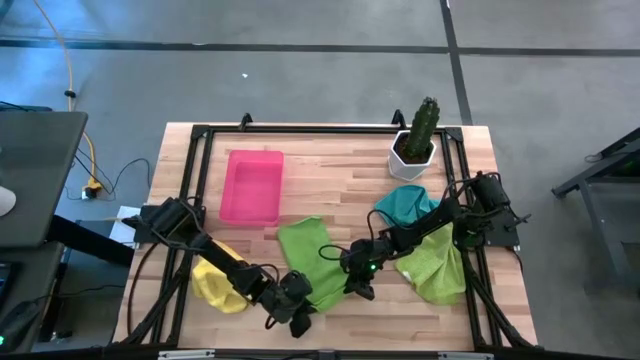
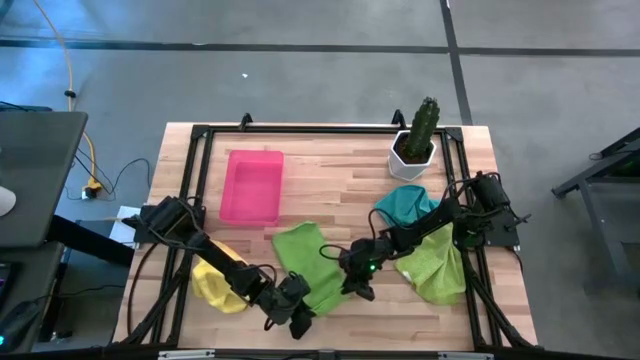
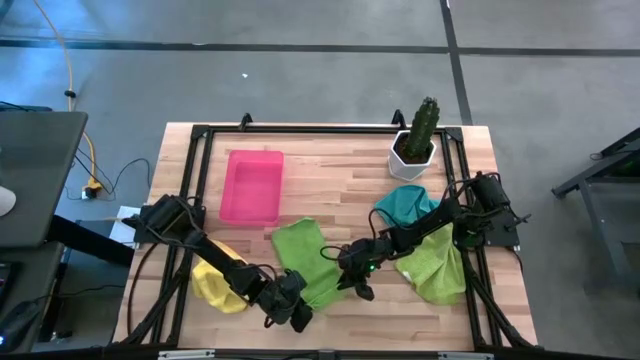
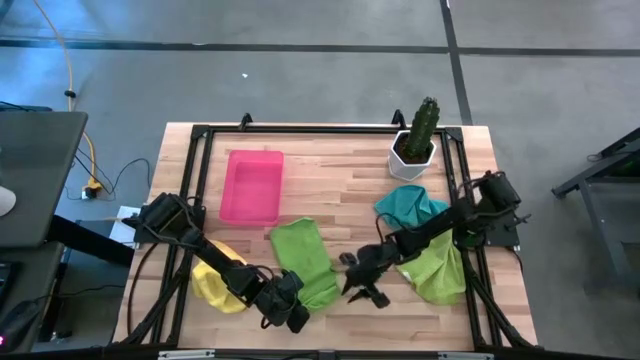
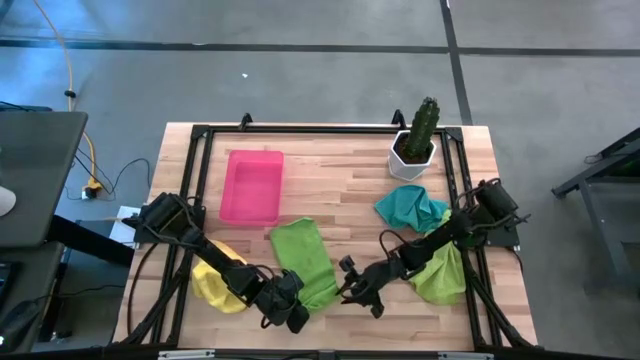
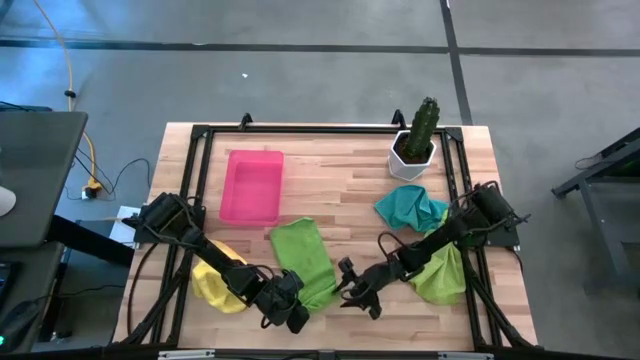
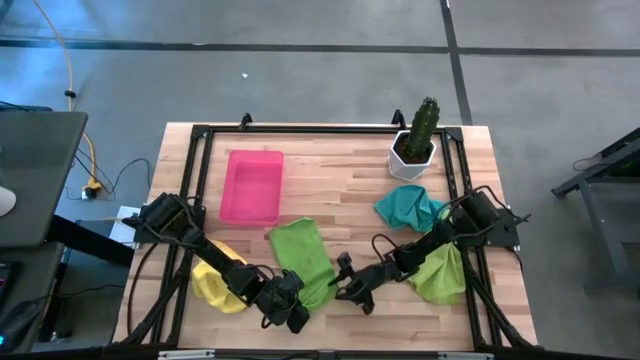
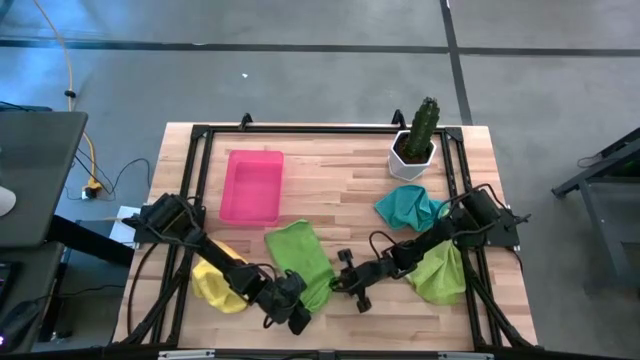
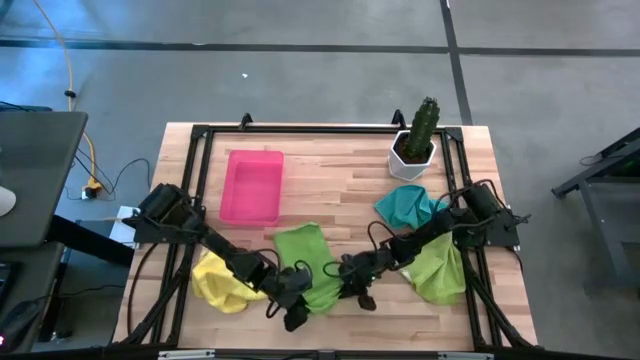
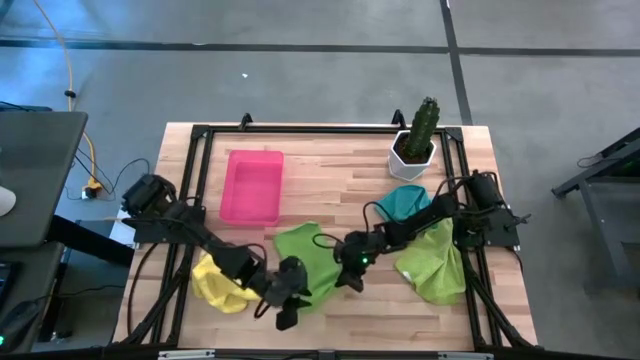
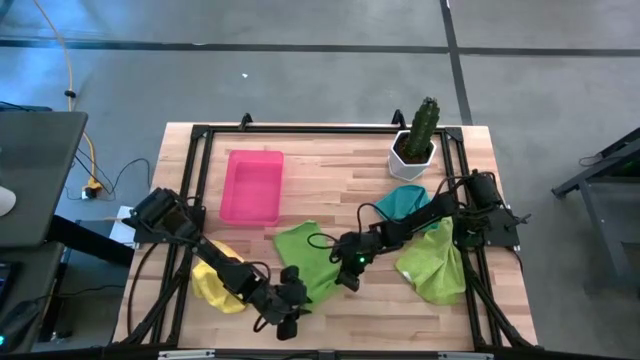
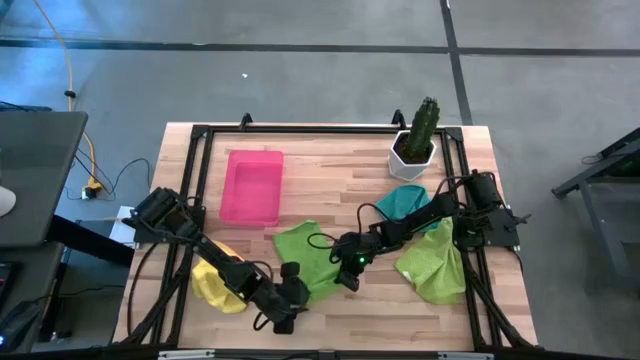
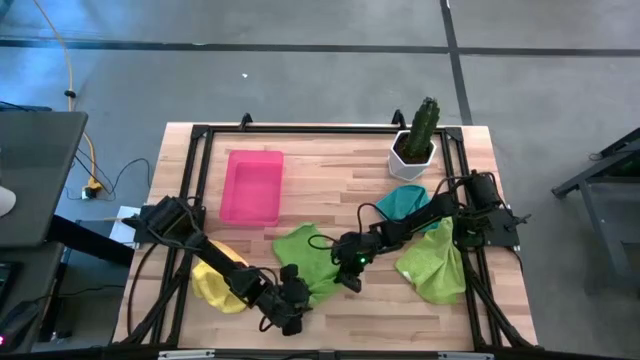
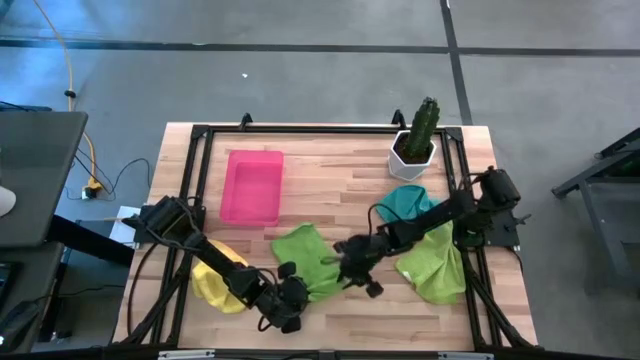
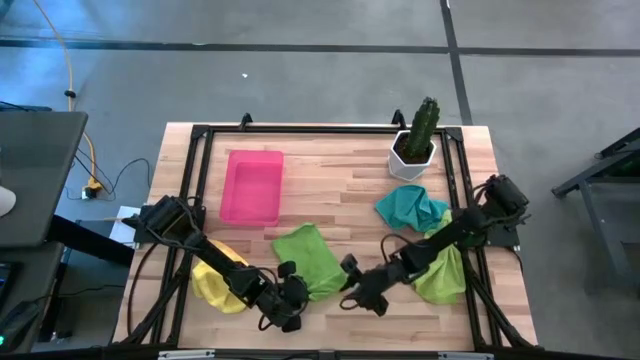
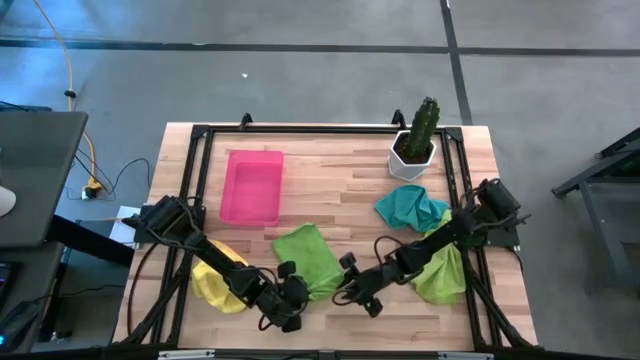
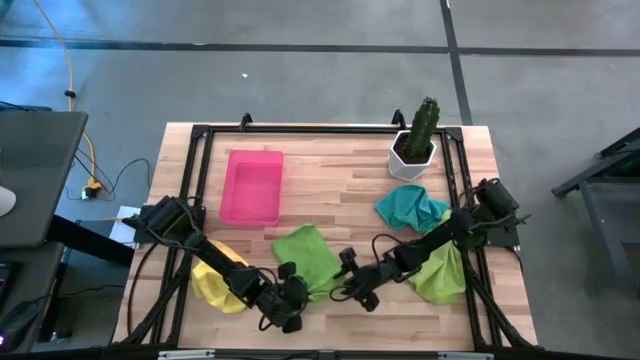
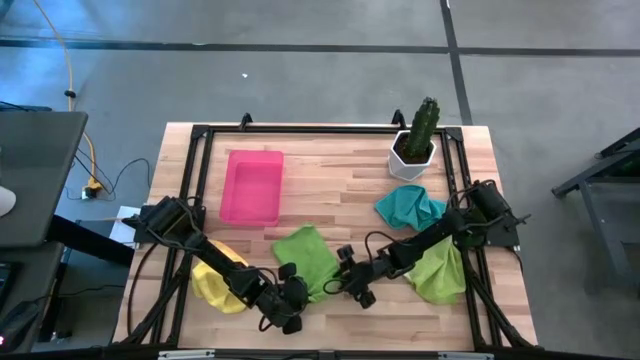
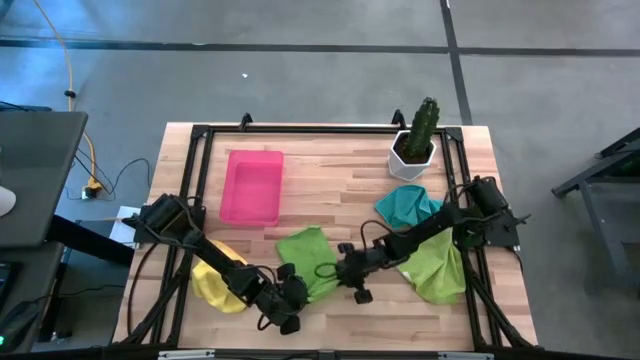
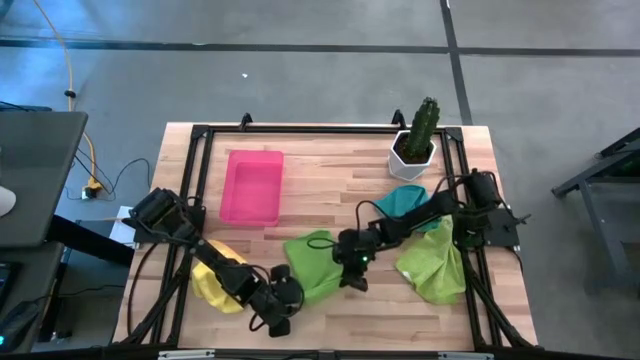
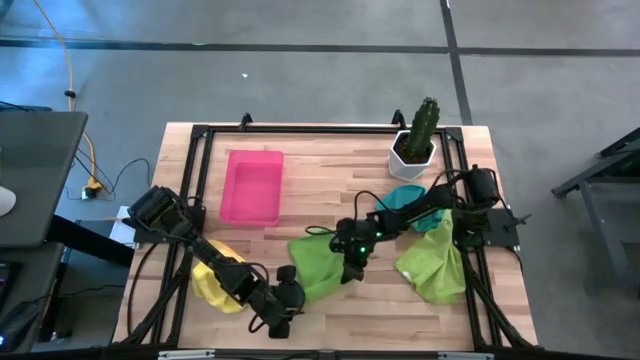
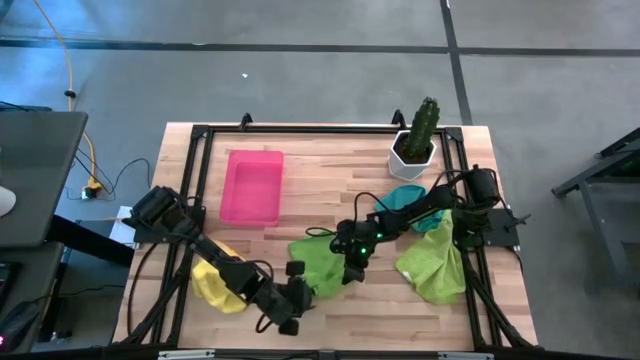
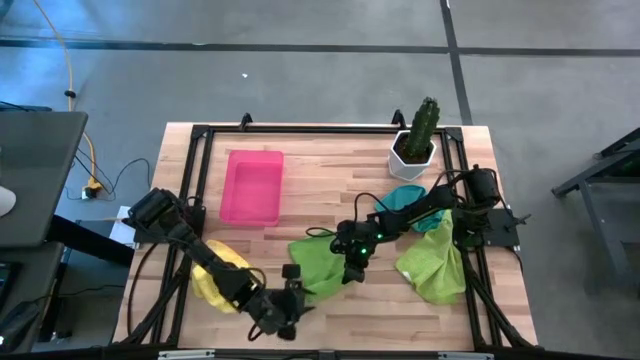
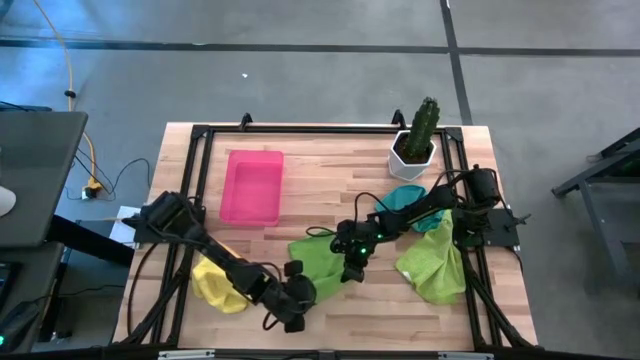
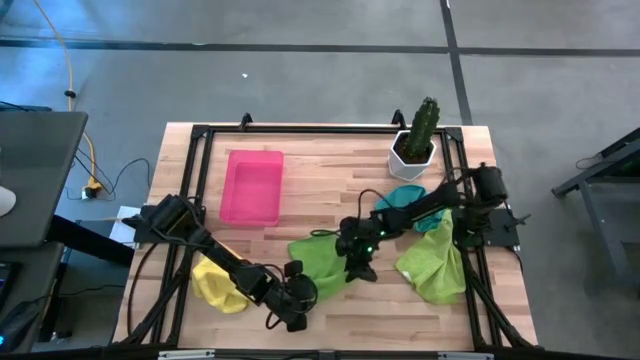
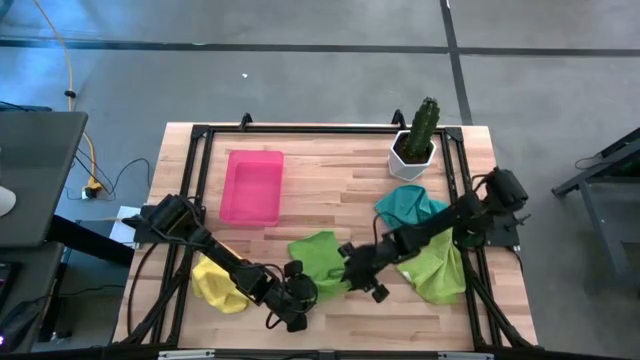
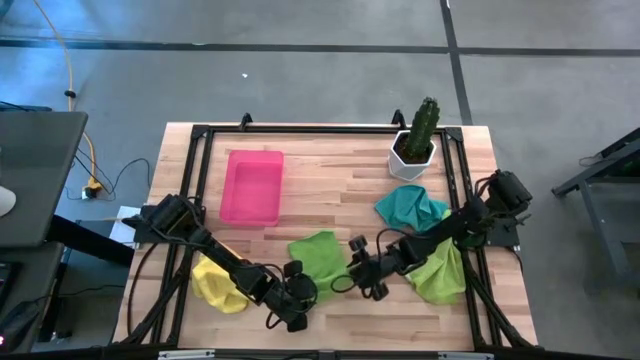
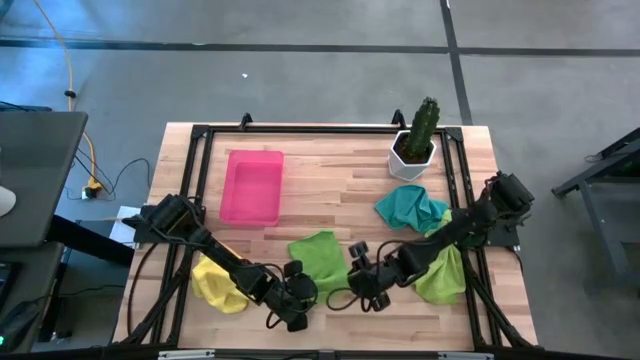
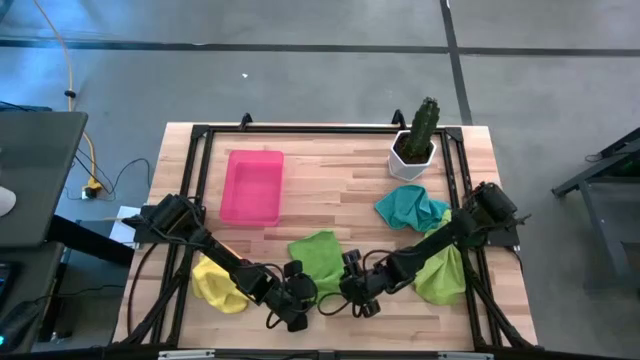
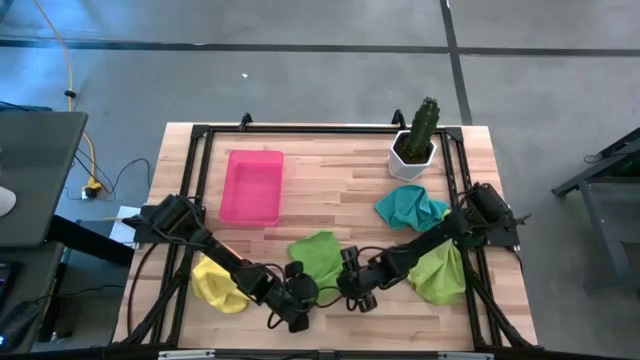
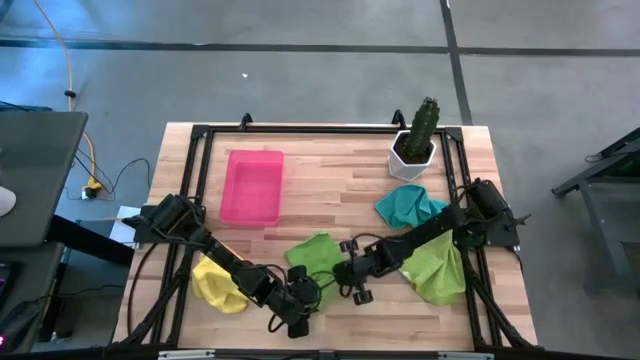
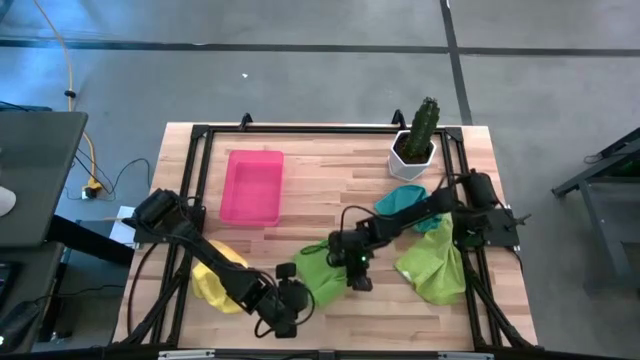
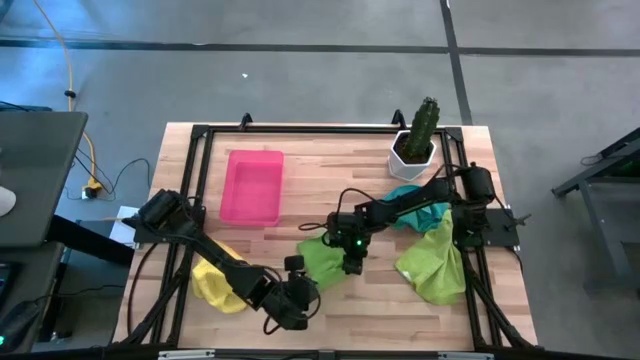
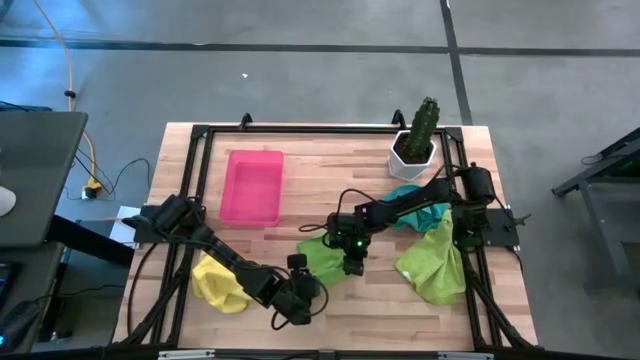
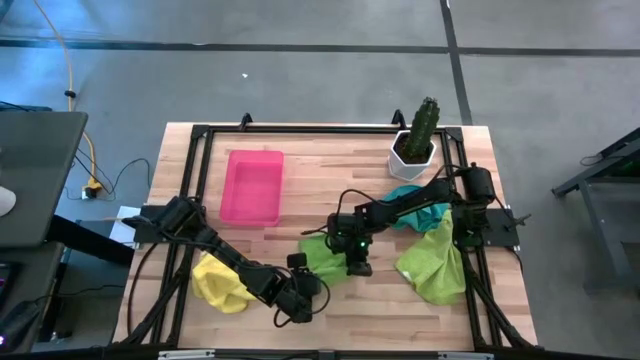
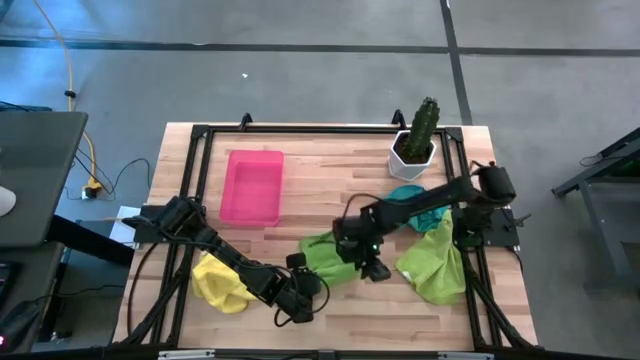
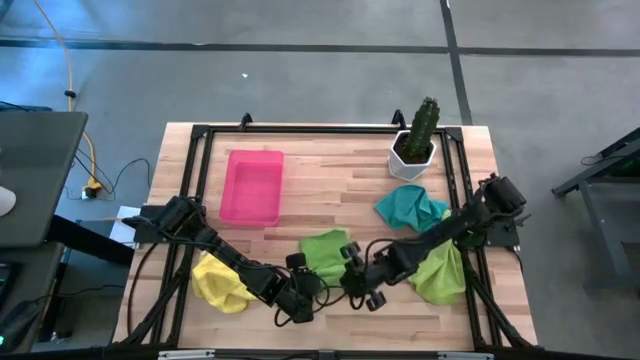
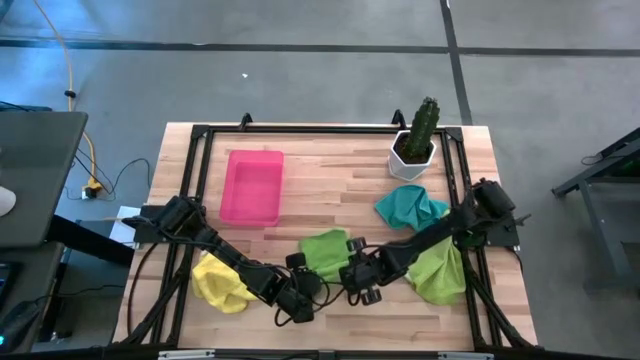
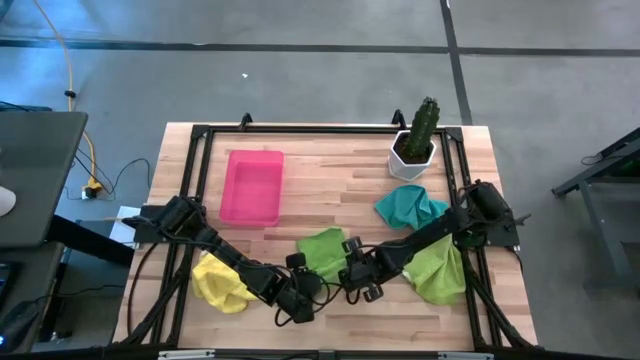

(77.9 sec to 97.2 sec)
Task: Roll microfiber towels into tight, uniform cylinder then place into a basket
Roll the green microfiber cloth

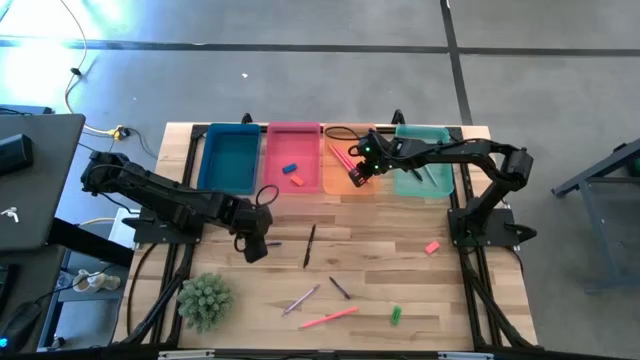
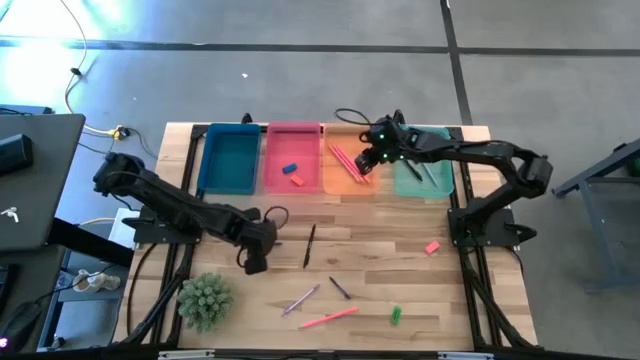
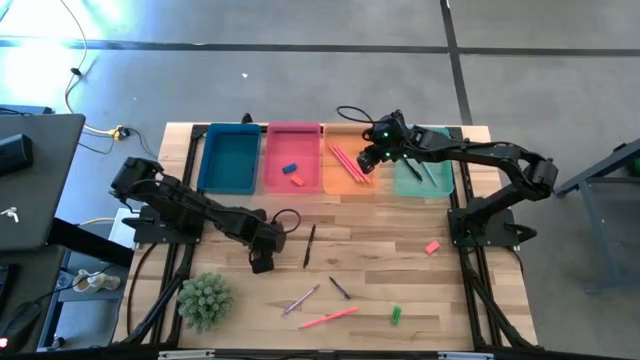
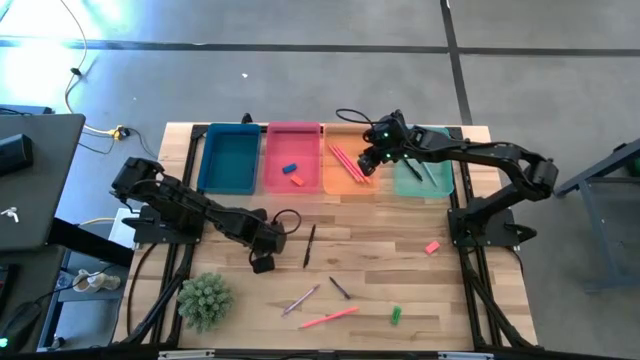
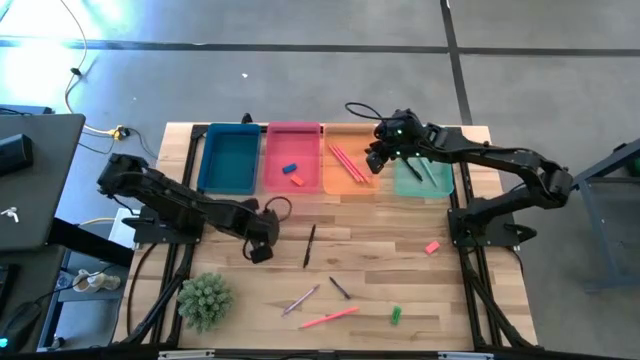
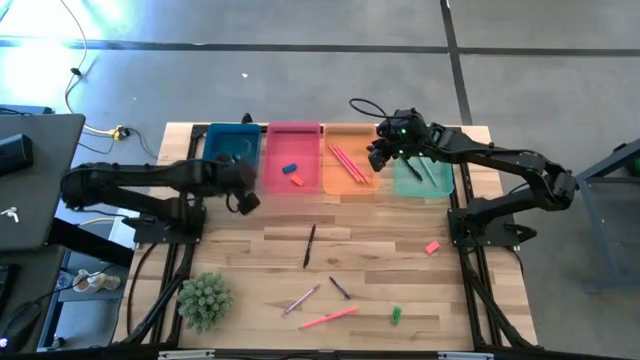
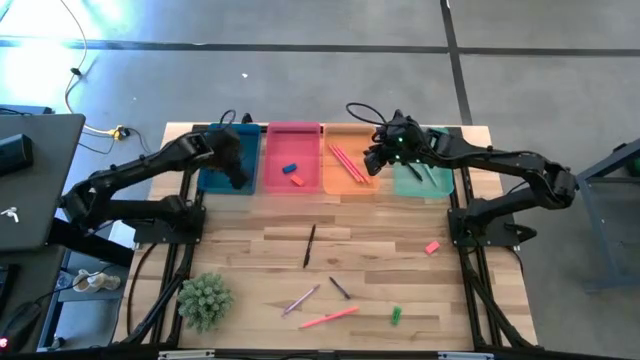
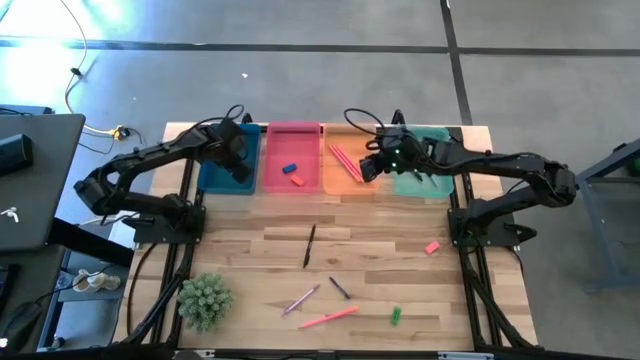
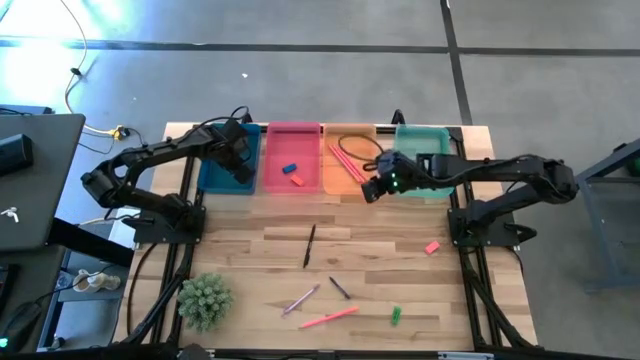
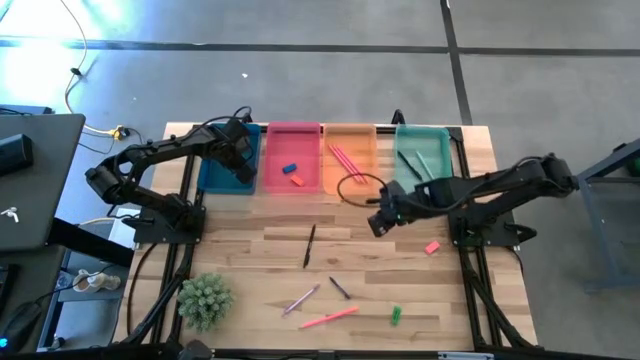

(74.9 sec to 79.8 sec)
Task: Sort crayons/erasers/pens/pencils in bins
Put the blue crayon into the blue bin
